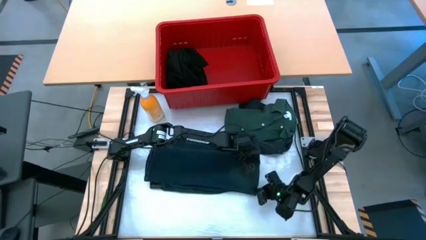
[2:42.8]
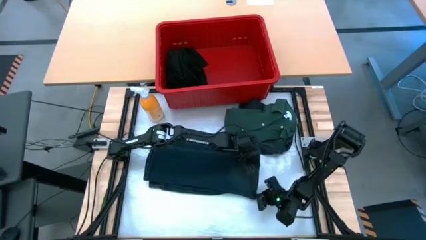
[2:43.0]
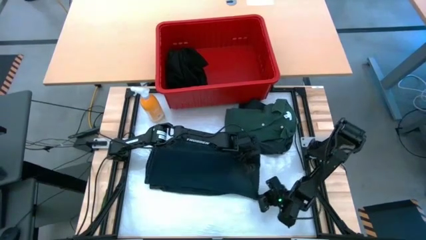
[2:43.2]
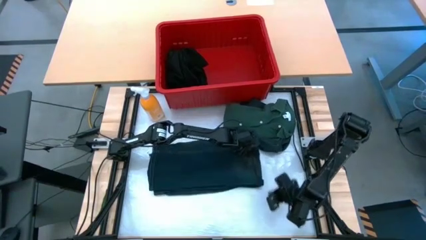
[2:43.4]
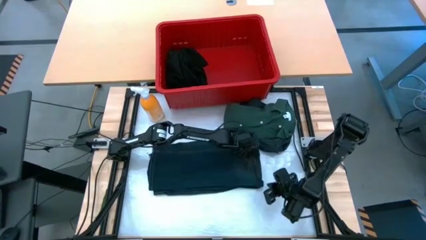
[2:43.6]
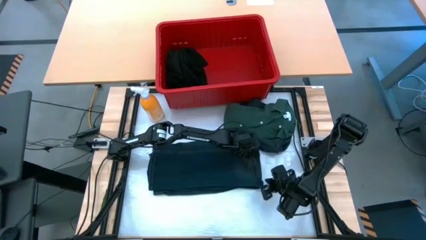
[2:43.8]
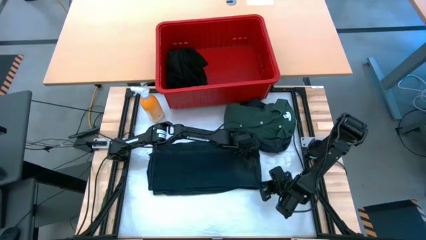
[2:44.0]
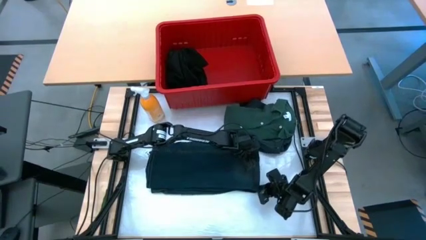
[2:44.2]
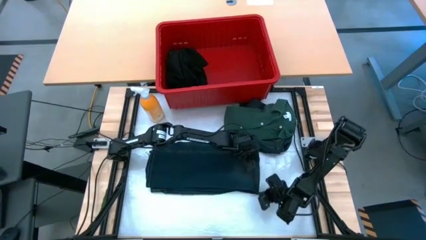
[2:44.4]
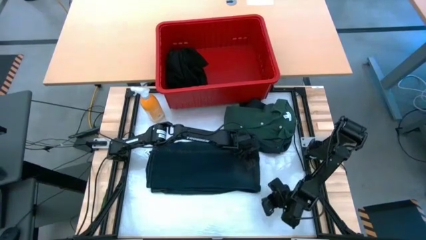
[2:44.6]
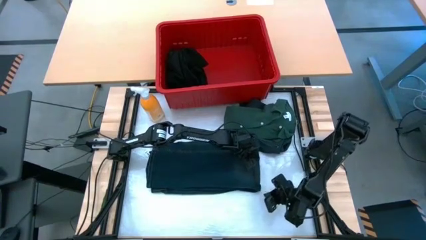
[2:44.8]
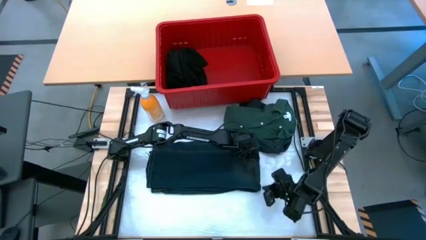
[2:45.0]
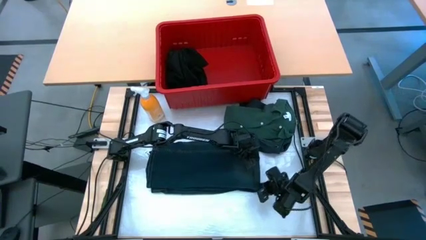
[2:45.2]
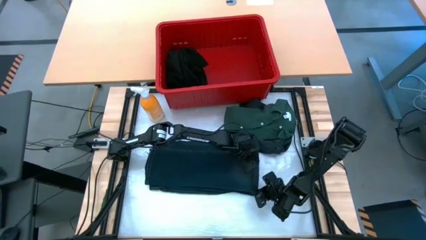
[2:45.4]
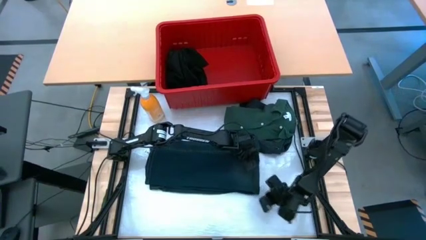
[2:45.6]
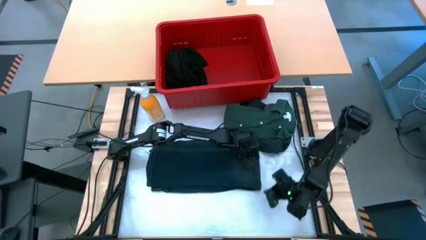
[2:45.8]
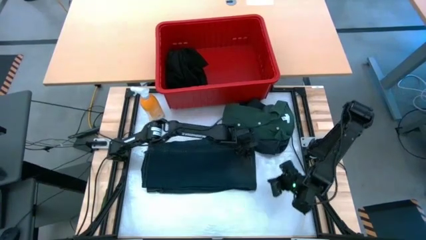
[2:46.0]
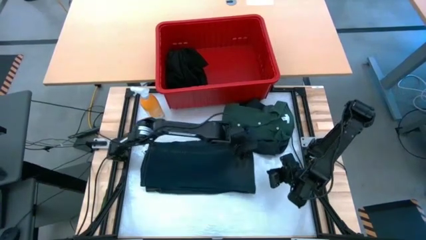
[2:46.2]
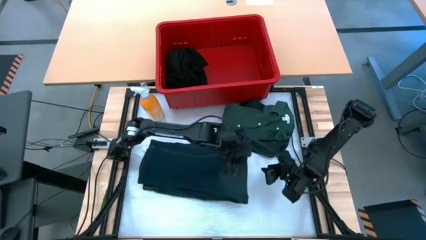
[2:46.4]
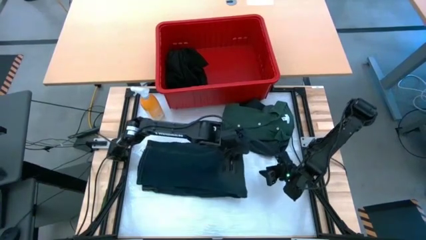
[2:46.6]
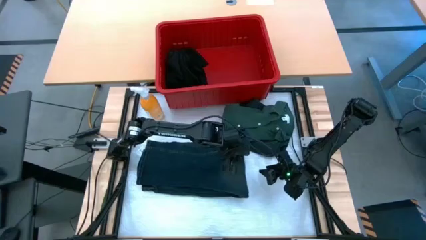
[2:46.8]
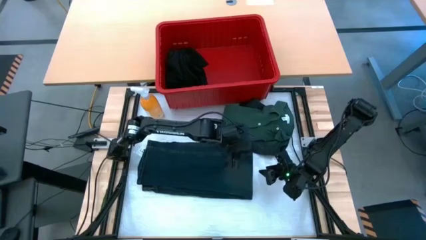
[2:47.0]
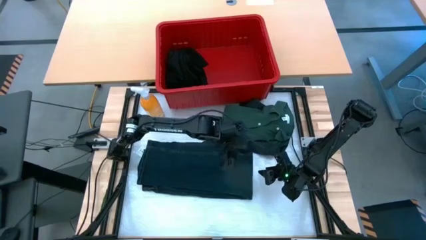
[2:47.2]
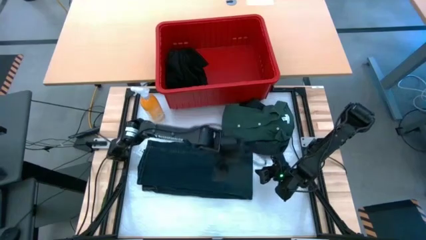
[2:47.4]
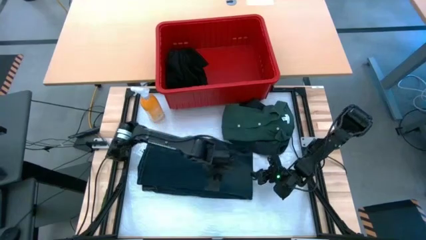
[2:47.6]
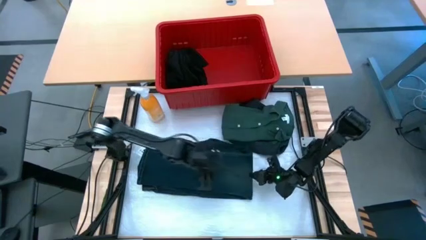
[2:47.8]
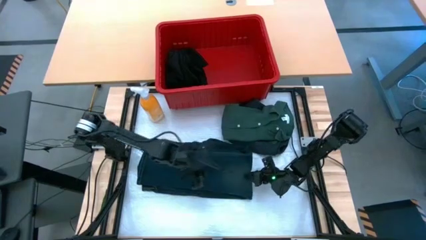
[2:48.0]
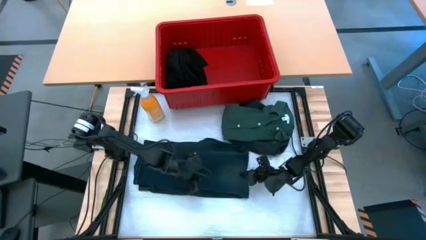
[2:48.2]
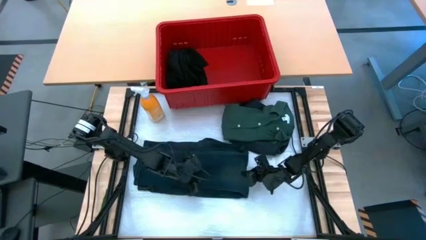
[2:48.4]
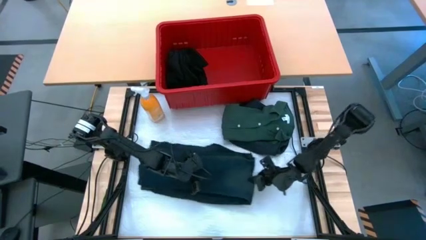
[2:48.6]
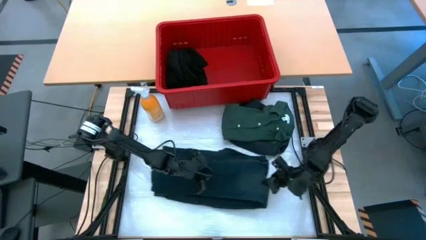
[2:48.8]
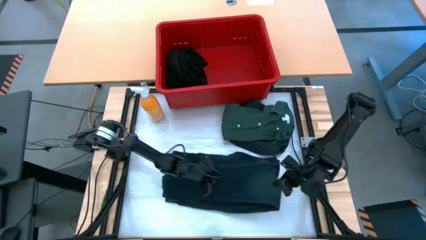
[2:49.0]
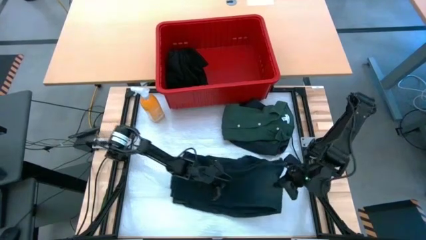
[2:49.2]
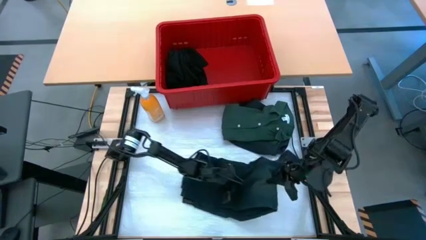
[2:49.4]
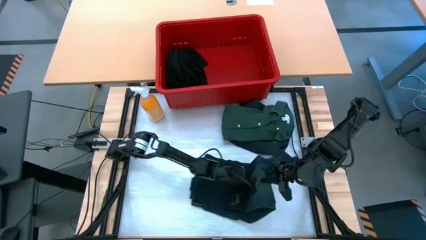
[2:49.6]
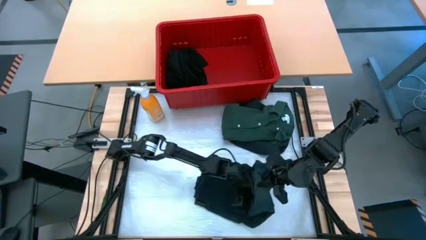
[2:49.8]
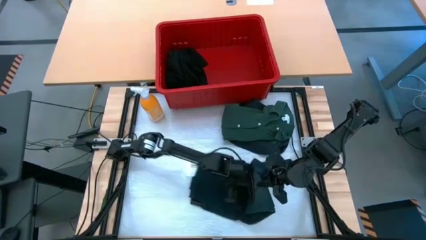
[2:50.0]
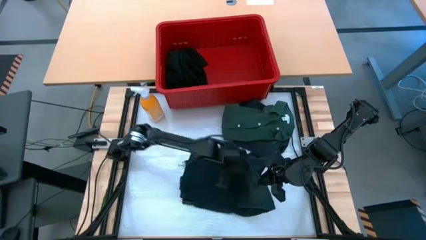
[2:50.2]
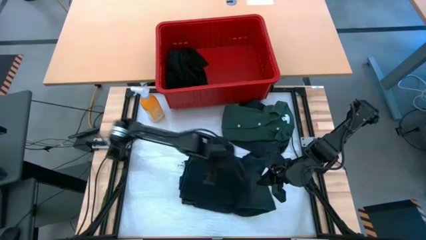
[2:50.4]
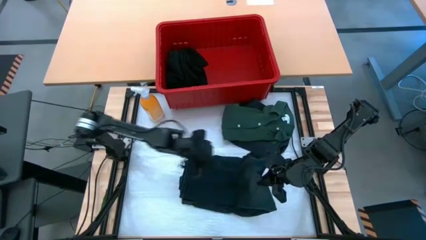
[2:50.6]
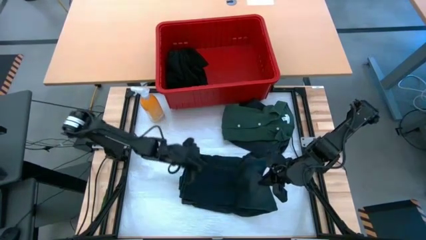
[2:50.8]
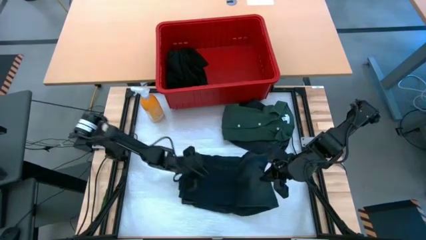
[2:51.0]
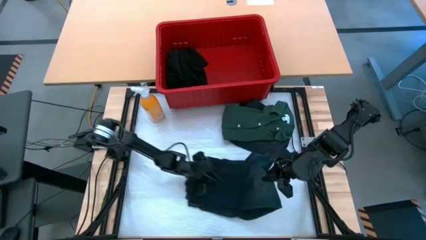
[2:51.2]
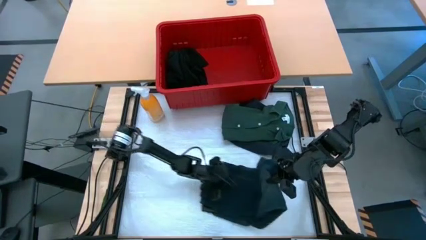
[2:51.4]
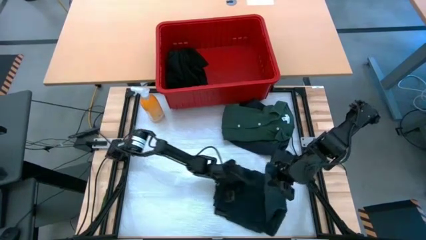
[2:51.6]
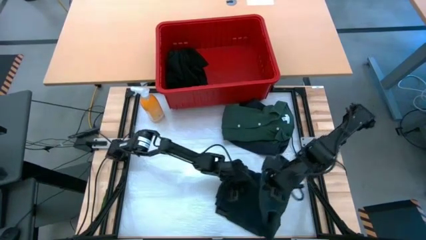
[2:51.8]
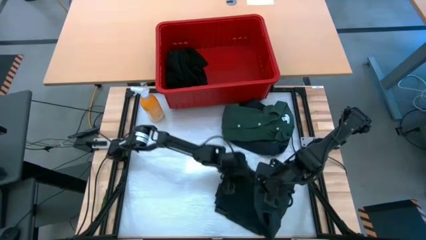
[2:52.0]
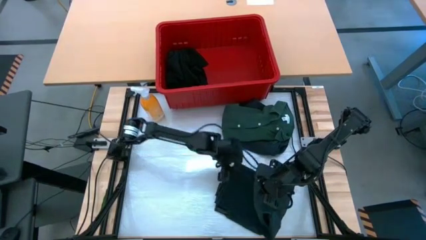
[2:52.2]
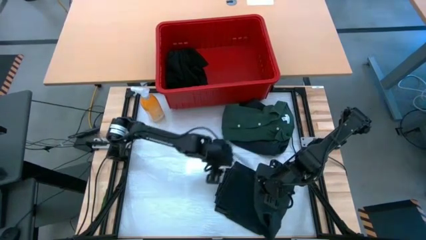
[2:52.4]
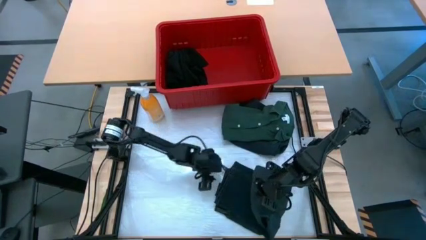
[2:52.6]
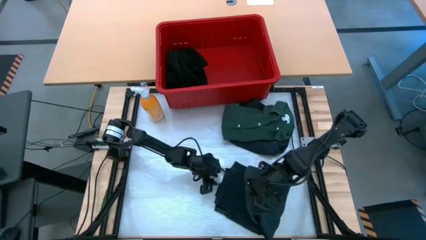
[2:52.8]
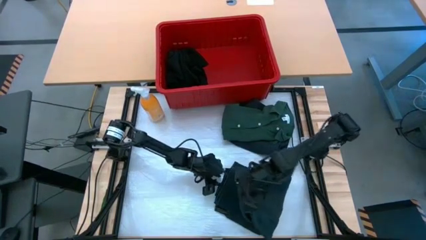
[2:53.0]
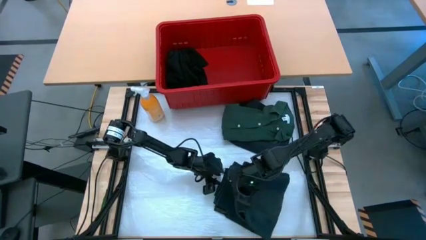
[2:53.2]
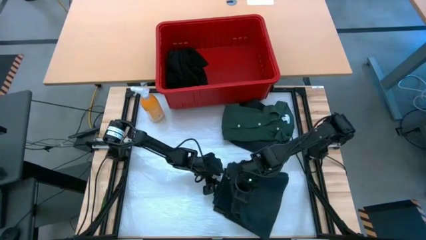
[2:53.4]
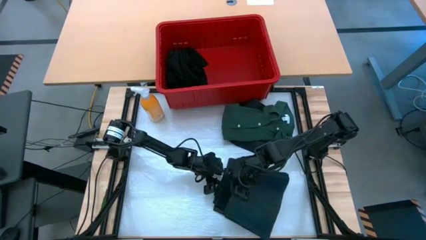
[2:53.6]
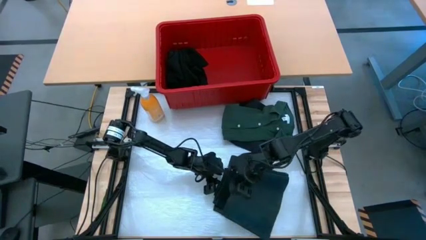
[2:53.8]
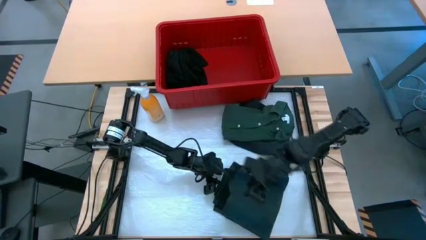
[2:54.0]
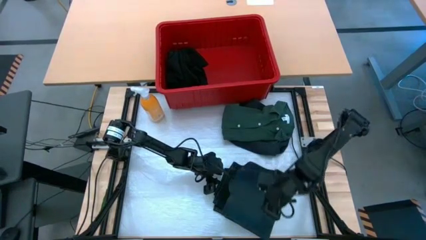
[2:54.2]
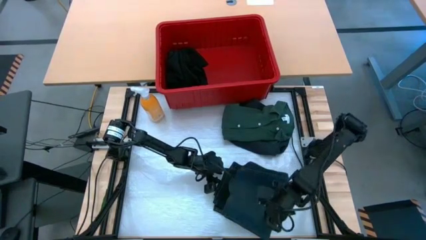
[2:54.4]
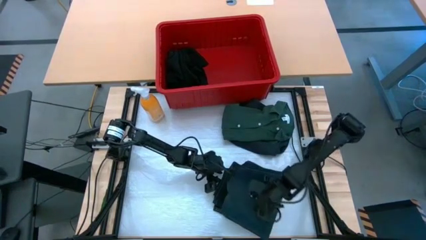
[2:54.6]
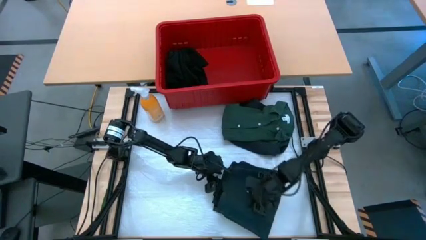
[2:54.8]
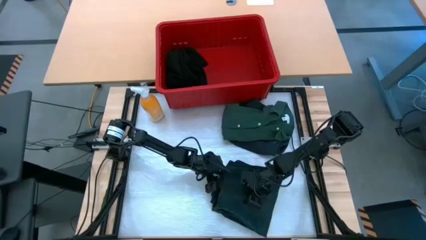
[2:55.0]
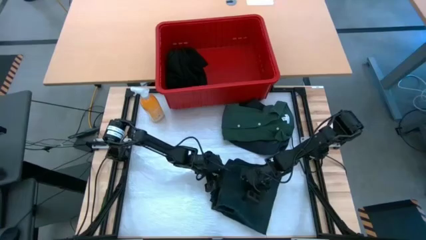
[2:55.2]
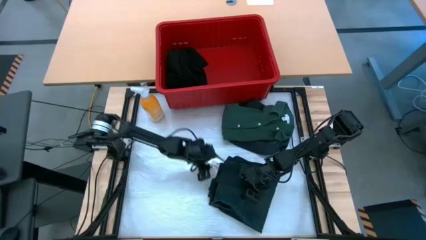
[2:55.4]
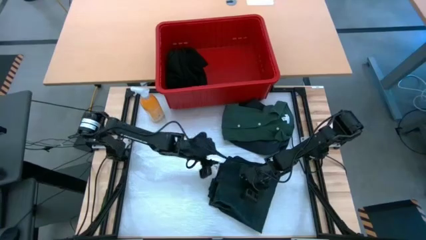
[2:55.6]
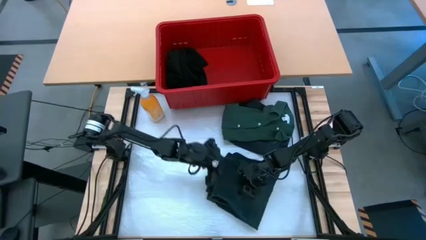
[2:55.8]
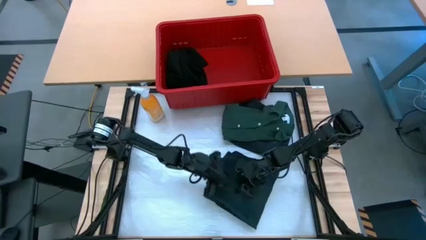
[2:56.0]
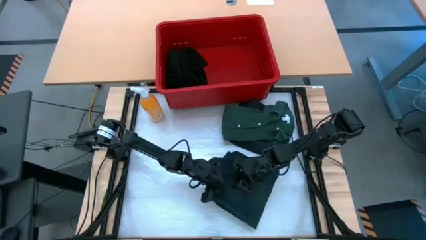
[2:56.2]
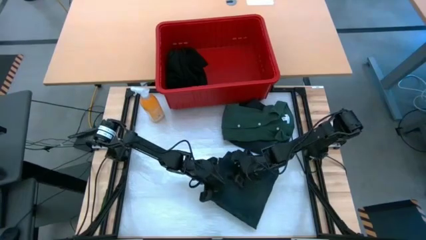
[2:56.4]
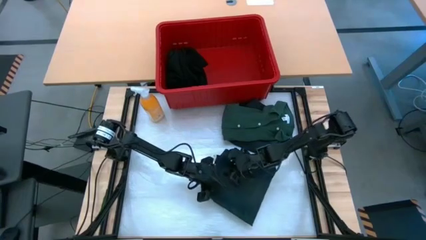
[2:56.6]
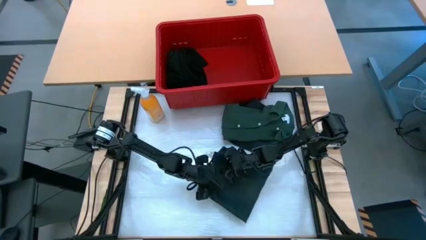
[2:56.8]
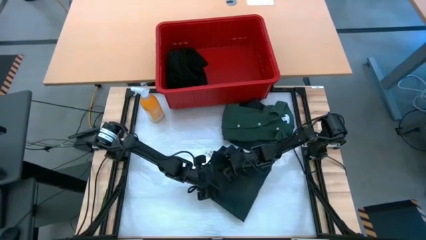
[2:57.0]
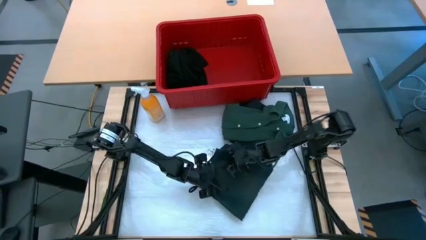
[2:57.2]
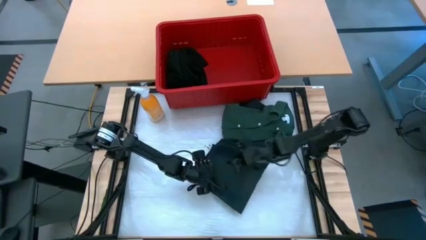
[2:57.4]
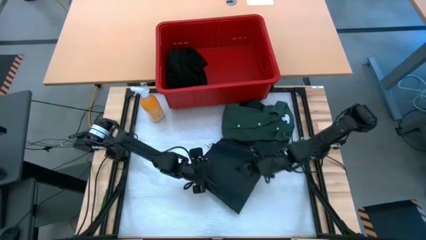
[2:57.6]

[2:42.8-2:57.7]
Task: Fold Laundry from Bin
Fold the blue pants from the bin
